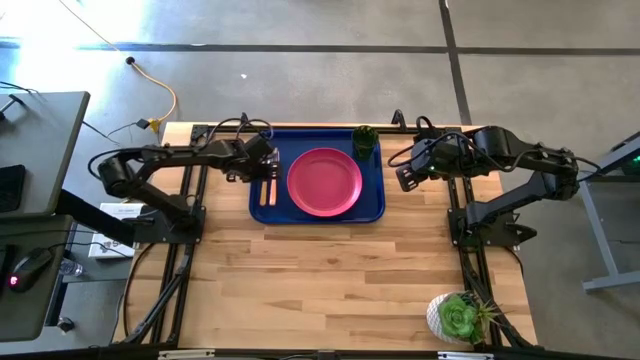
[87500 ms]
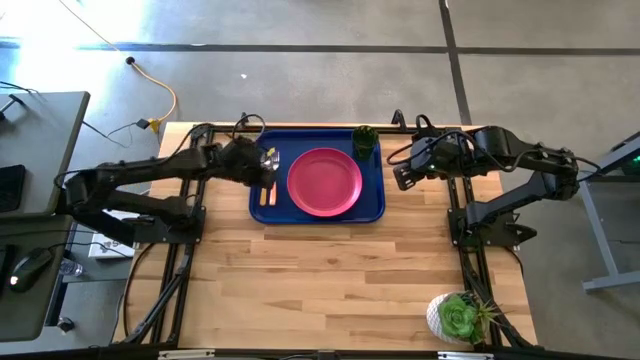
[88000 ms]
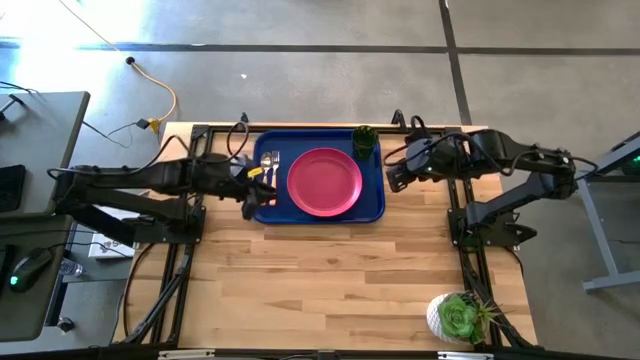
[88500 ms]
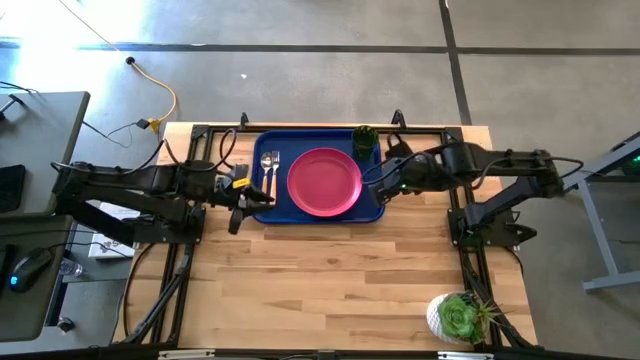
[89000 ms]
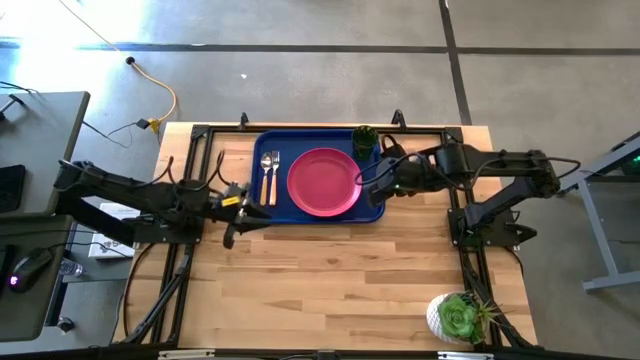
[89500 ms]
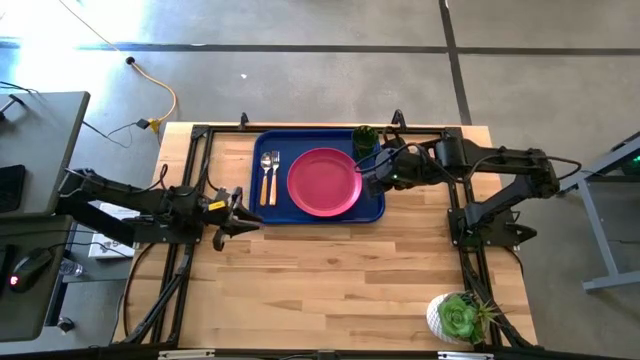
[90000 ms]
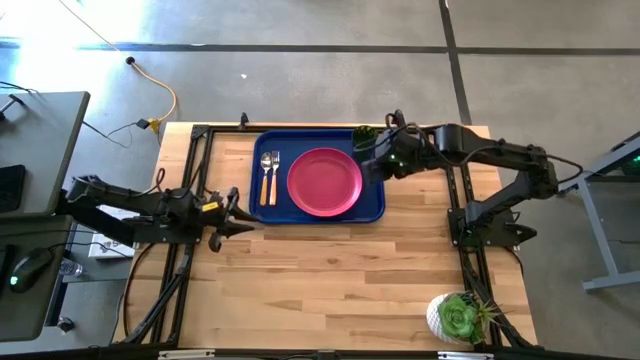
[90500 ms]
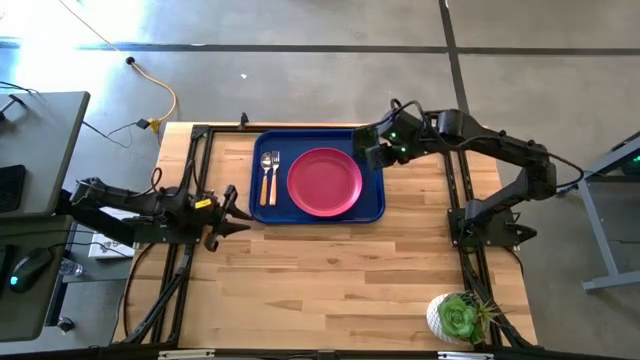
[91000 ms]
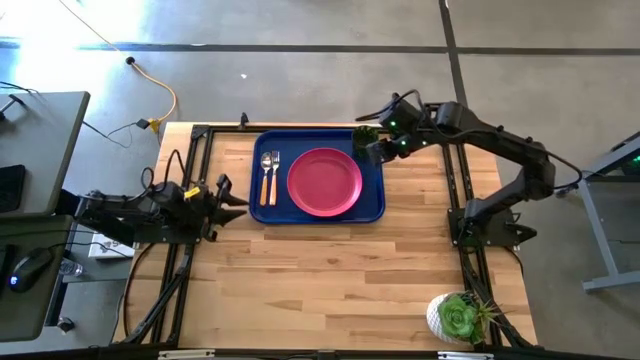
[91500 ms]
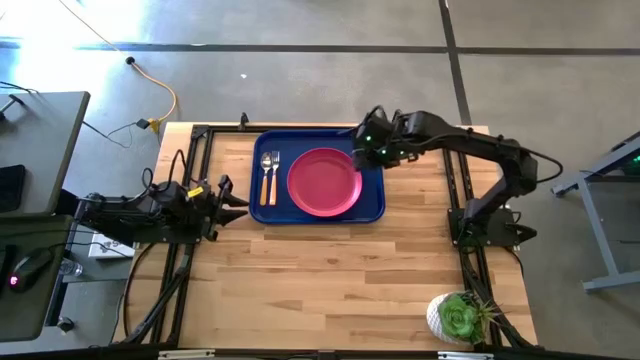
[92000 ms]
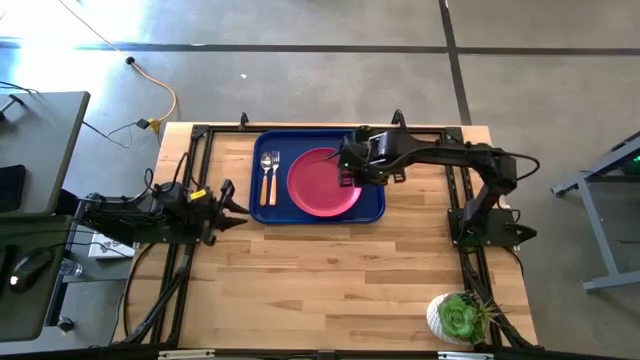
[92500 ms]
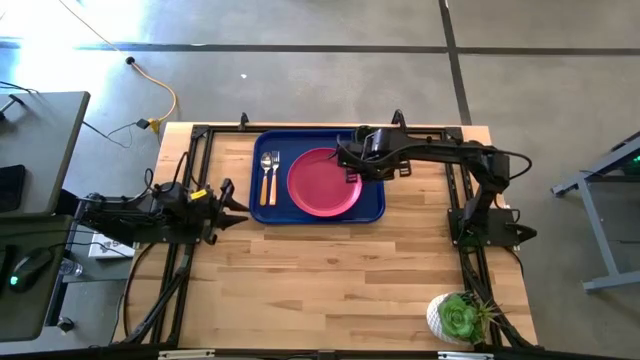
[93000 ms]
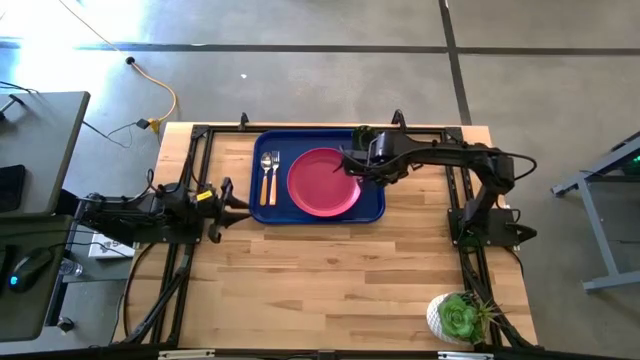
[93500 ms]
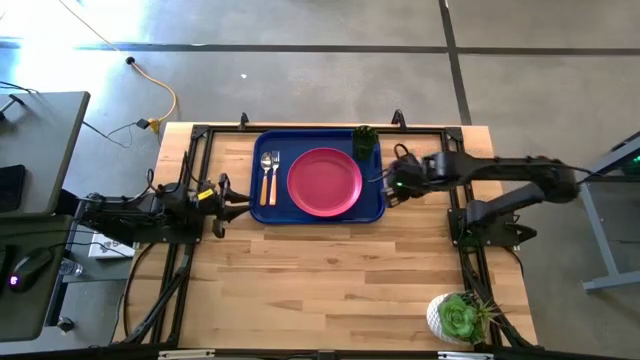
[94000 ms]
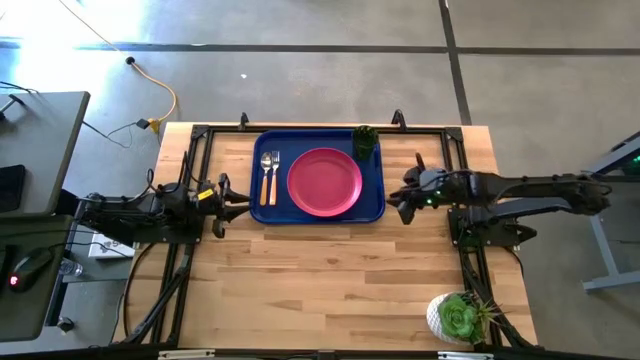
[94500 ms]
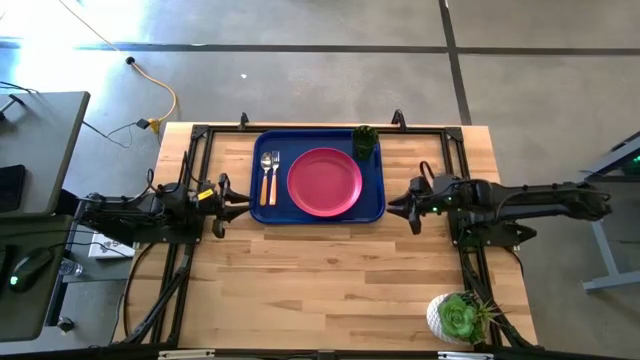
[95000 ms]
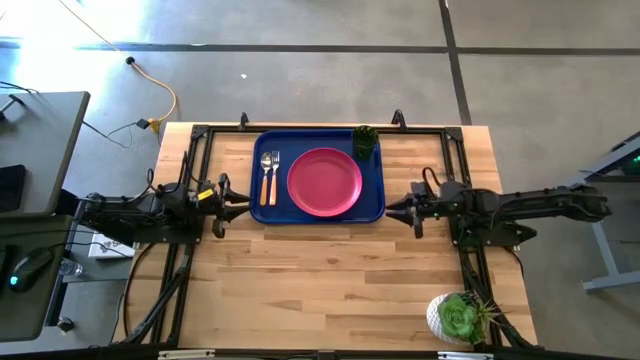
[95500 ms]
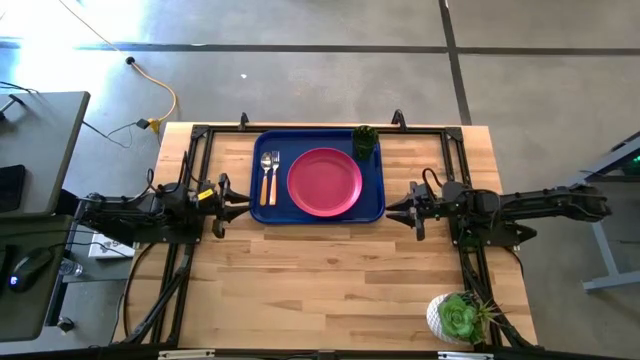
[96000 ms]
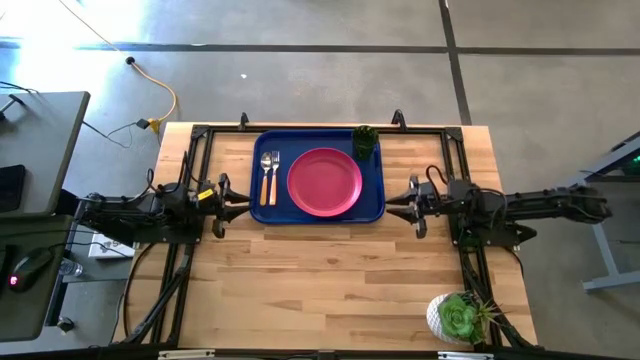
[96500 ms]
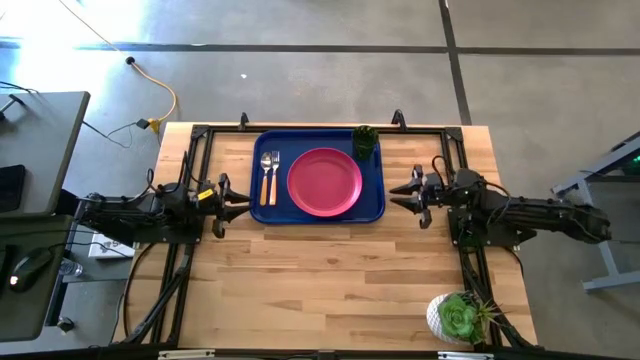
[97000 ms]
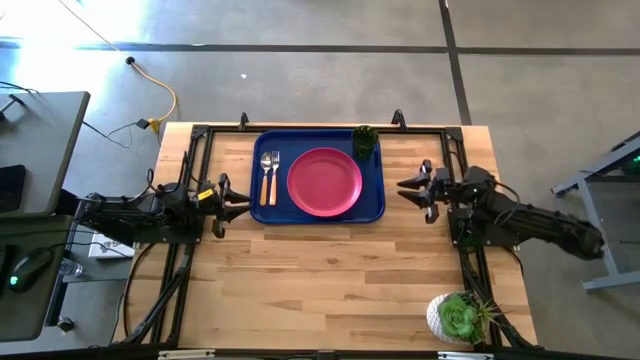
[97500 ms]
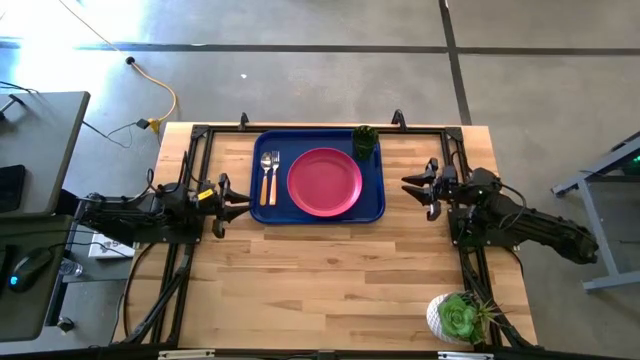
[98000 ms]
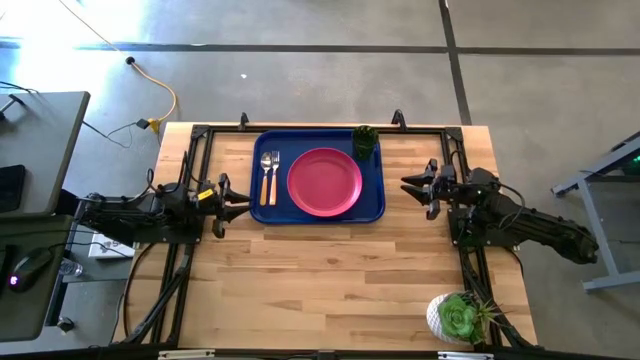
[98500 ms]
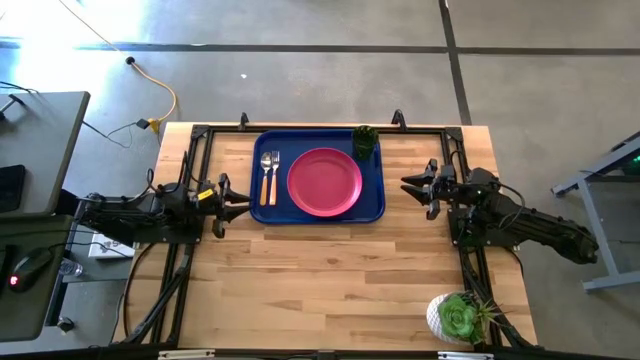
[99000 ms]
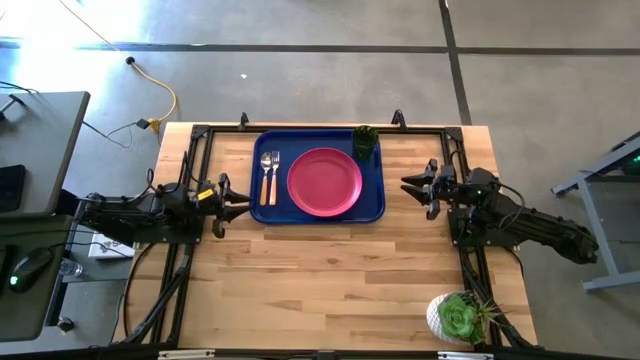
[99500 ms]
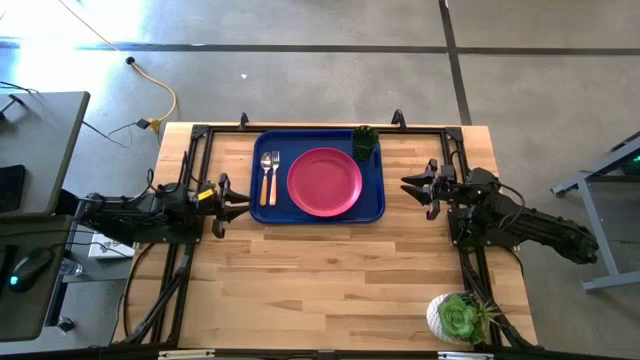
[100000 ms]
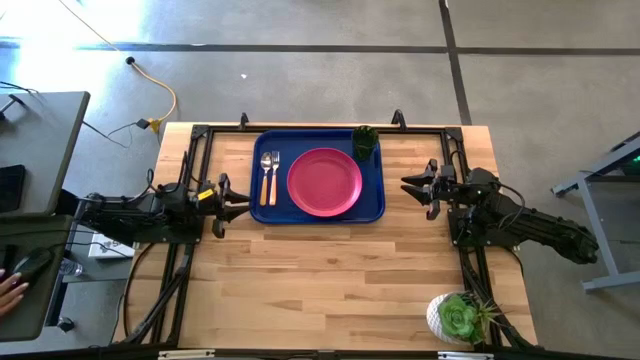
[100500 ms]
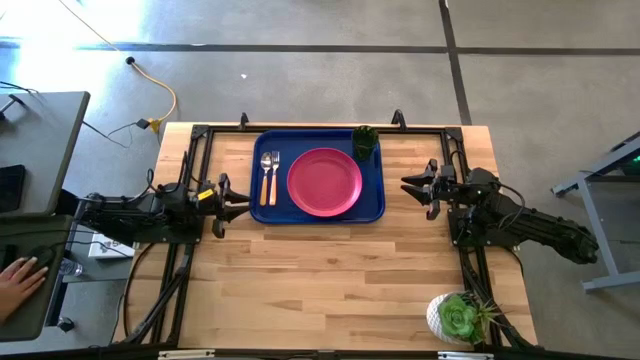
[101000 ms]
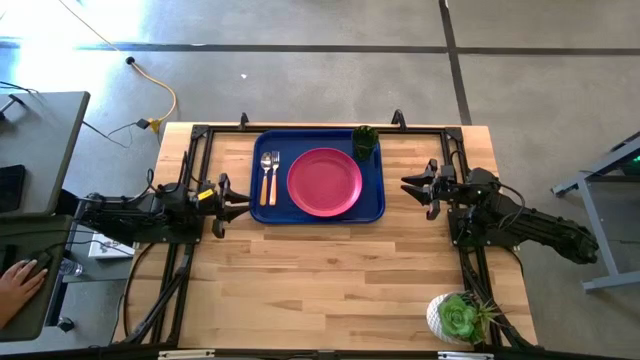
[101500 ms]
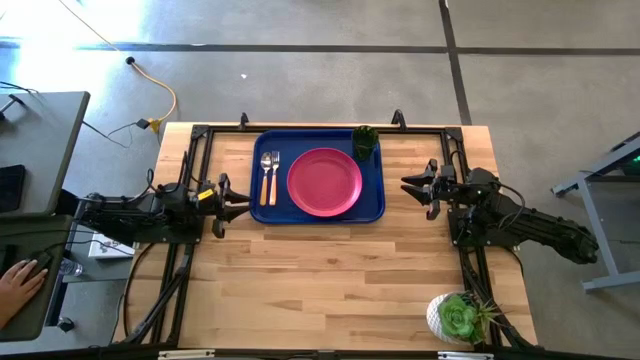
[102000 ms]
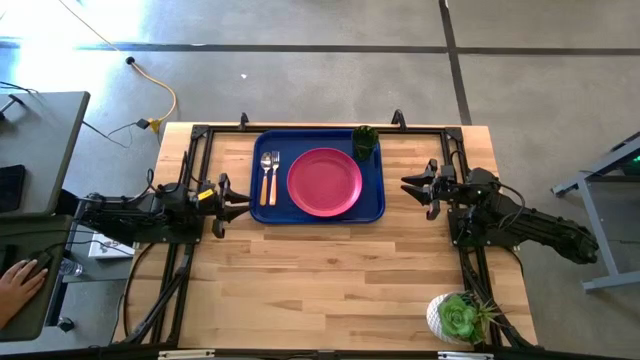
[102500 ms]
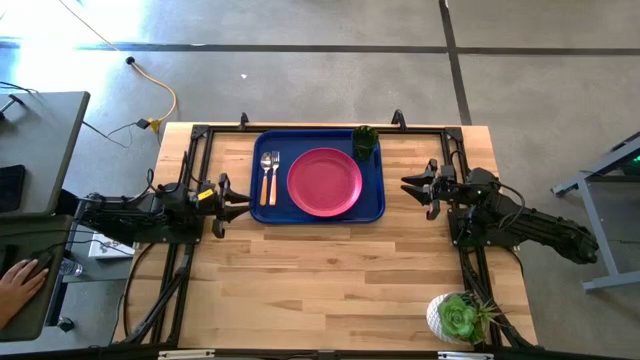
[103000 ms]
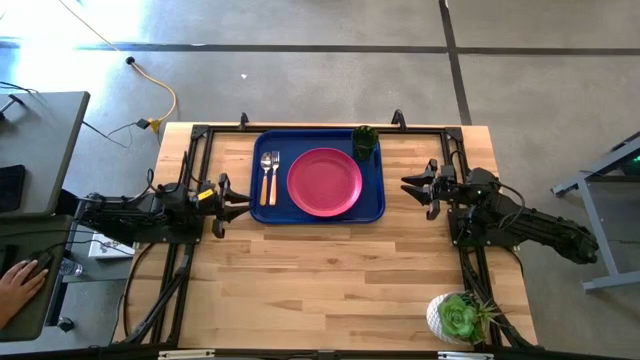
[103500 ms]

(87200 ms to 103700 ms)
Task: Pick and place plate/cup/fork/spoon on tray
Return to Home Position

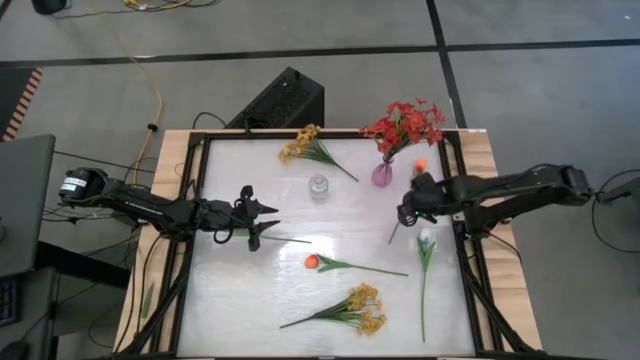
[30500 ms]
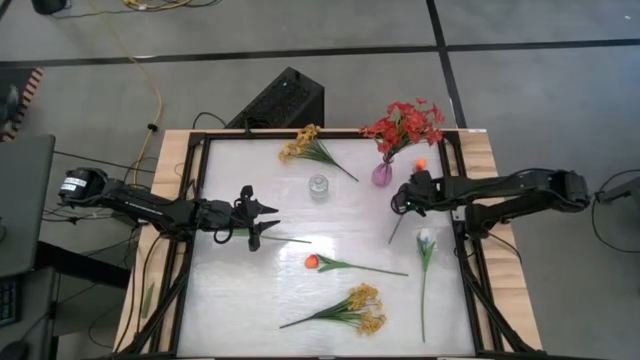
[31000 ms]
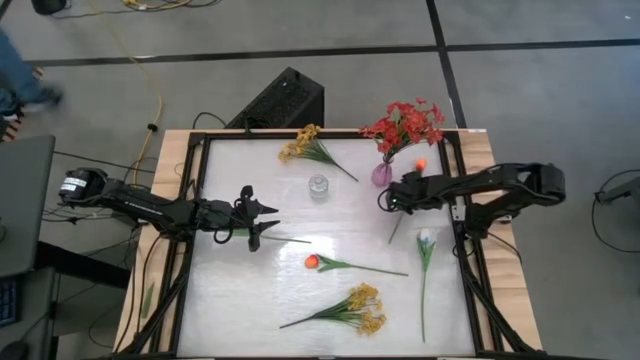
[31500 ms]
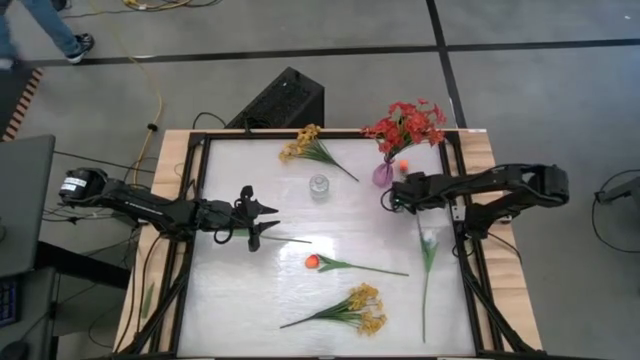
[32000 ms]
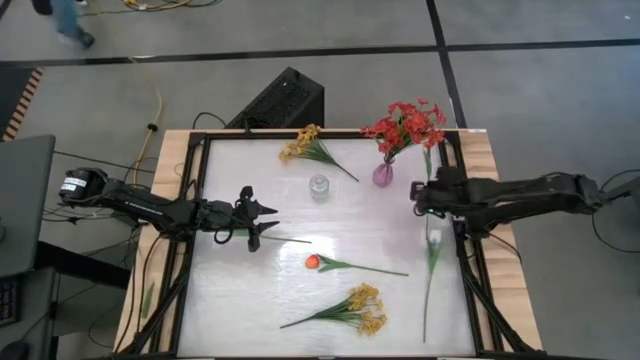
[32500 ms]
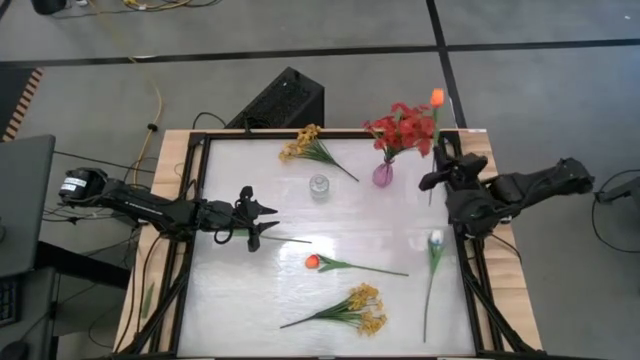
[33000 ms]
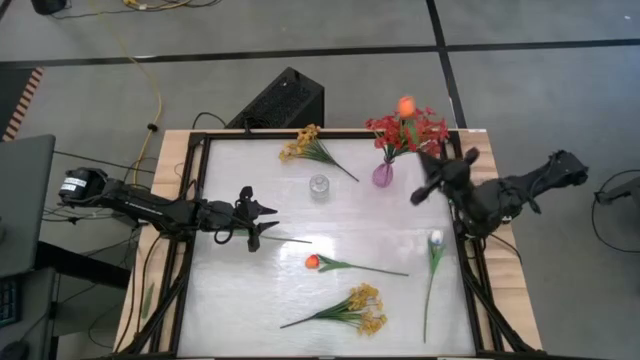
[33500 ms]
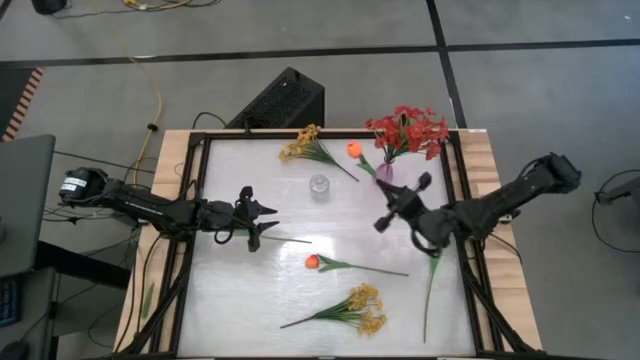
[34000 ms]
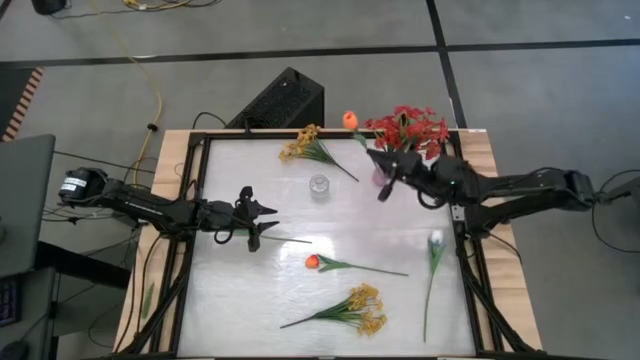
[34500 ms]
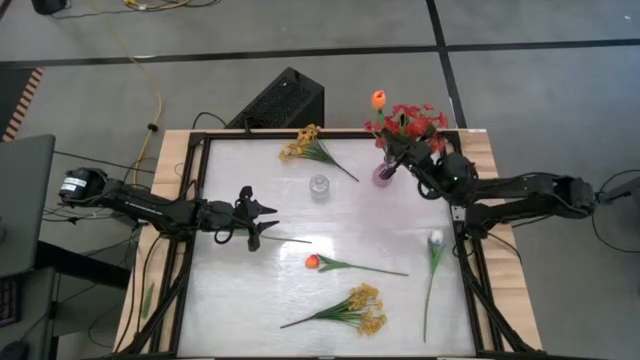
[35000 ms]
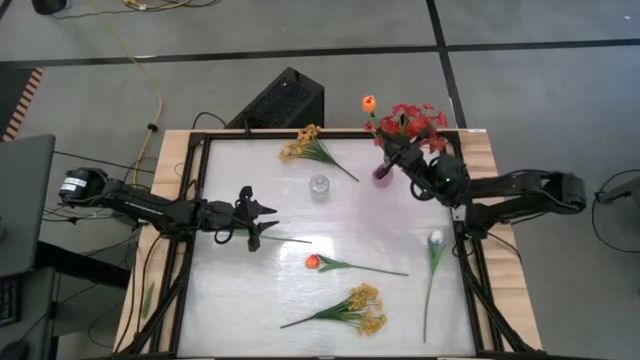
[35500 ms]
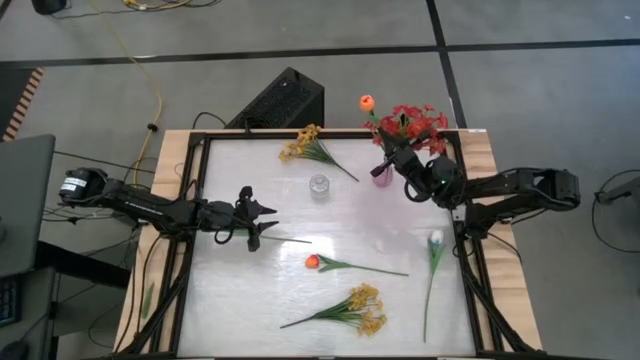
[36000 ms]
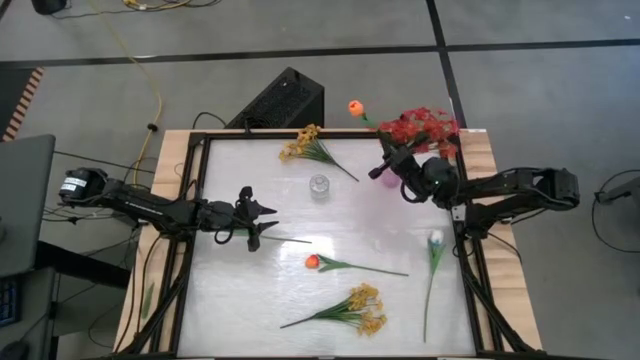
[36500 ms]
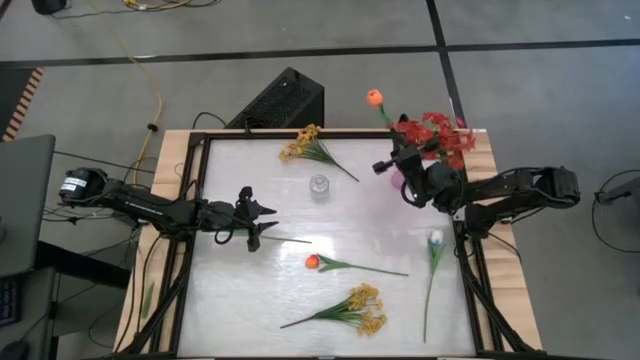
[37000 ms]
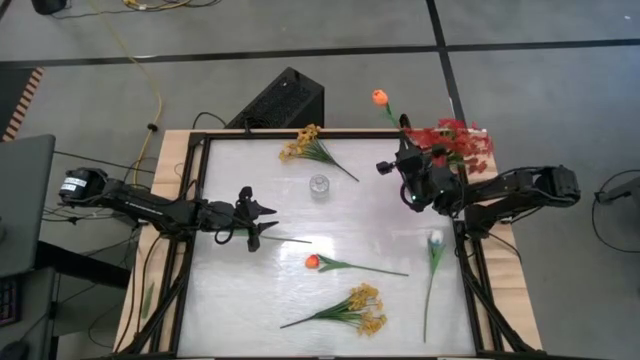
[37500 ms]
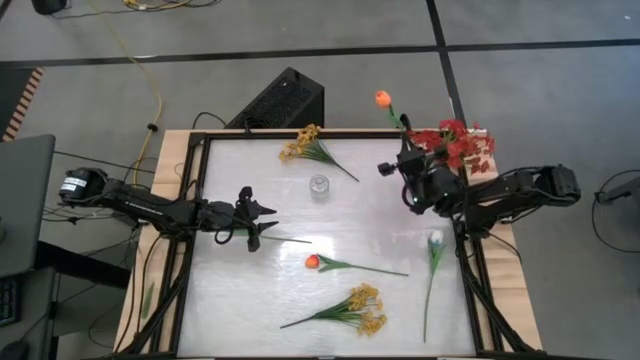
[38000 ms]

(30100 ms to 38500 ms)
Task: Sort flowers into vase by color
Put the right orange flower into the pink flower vase
